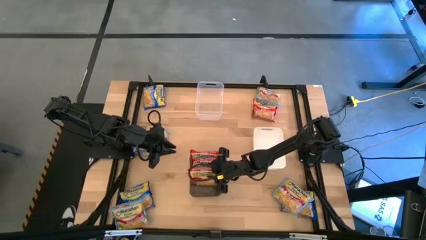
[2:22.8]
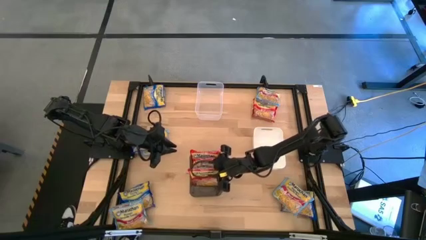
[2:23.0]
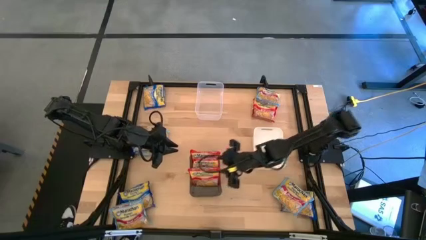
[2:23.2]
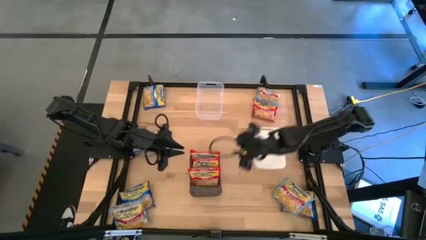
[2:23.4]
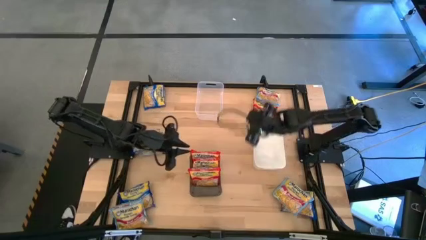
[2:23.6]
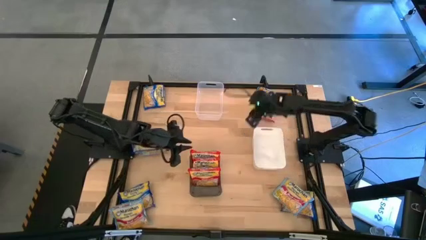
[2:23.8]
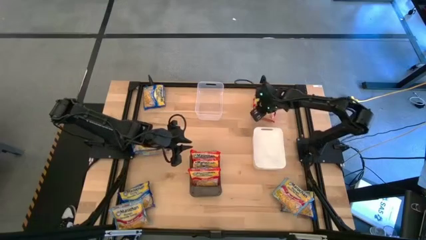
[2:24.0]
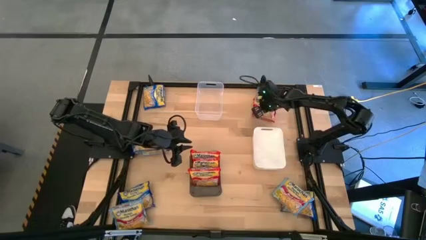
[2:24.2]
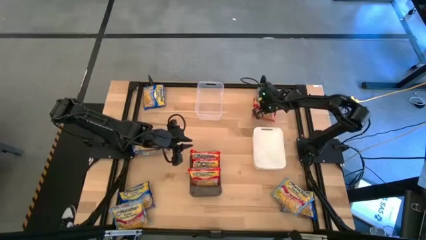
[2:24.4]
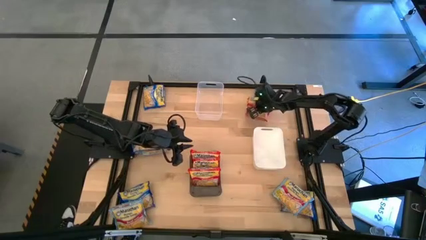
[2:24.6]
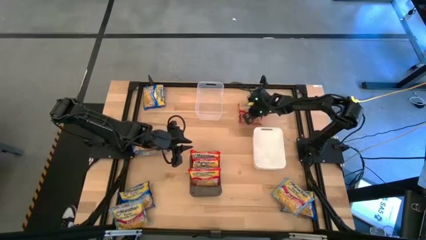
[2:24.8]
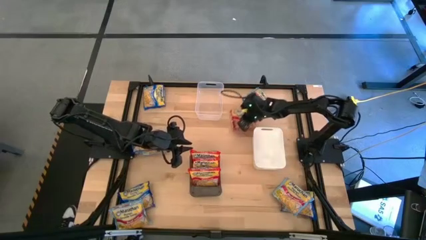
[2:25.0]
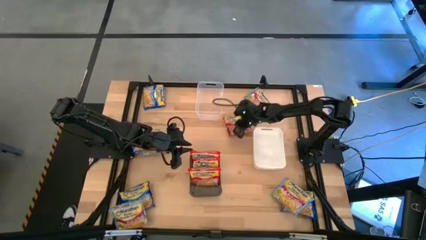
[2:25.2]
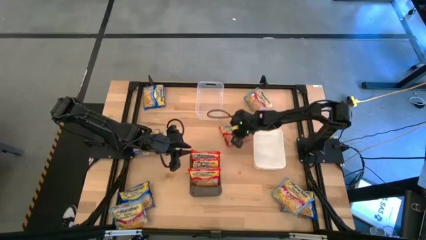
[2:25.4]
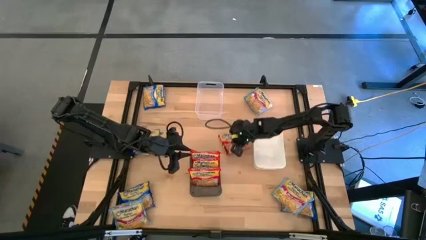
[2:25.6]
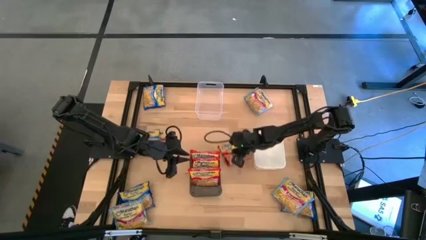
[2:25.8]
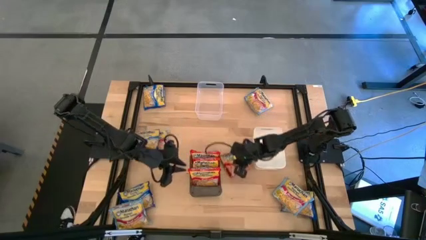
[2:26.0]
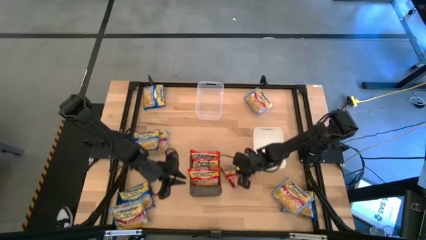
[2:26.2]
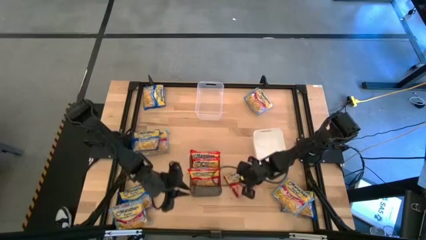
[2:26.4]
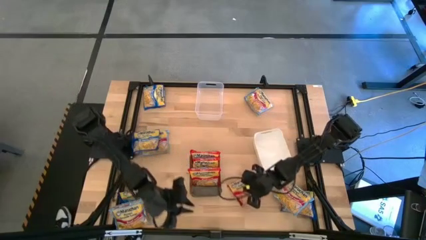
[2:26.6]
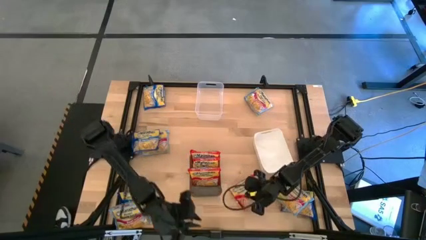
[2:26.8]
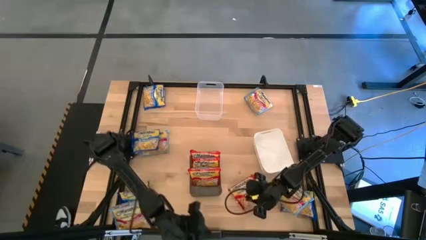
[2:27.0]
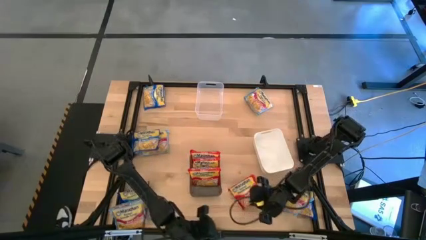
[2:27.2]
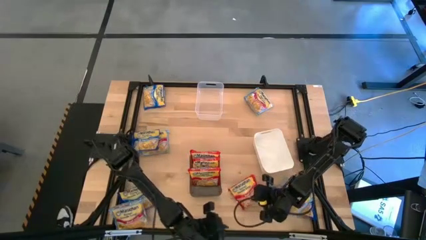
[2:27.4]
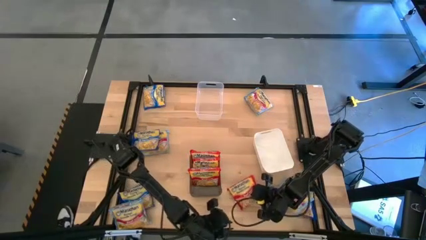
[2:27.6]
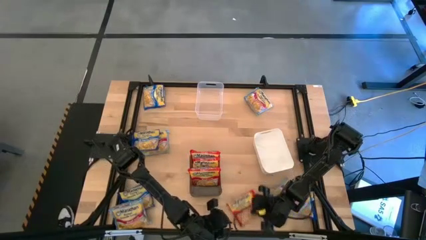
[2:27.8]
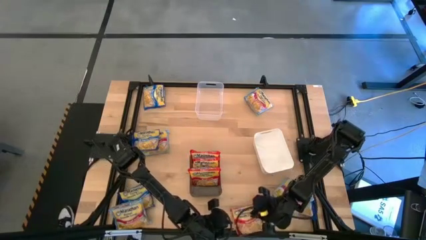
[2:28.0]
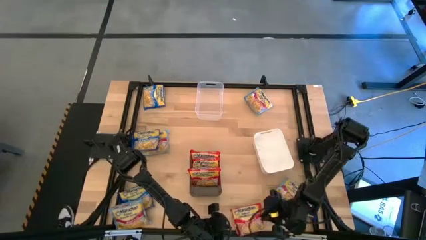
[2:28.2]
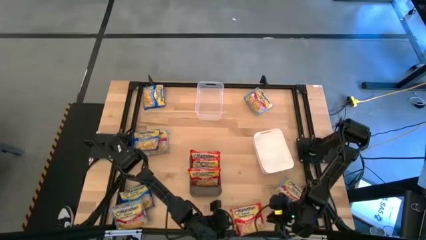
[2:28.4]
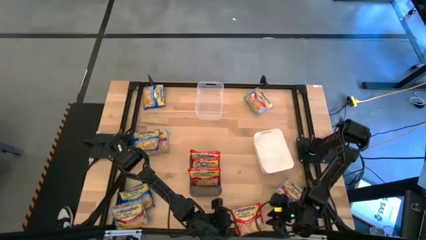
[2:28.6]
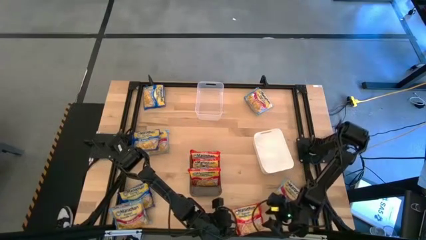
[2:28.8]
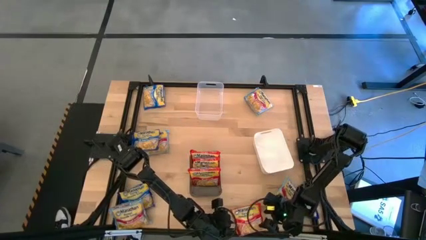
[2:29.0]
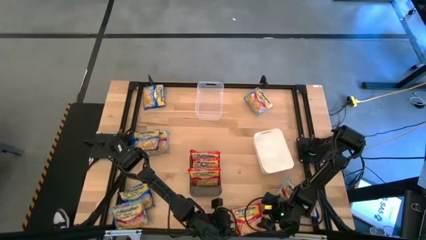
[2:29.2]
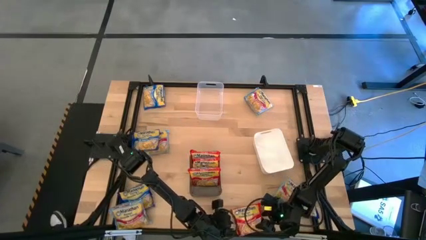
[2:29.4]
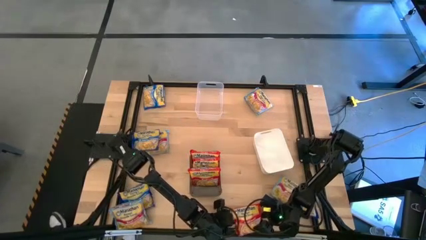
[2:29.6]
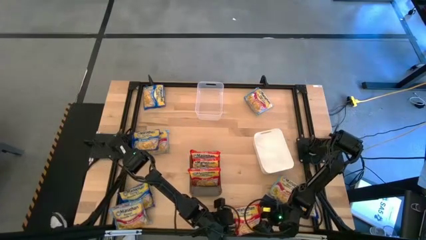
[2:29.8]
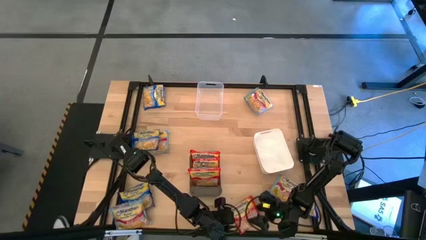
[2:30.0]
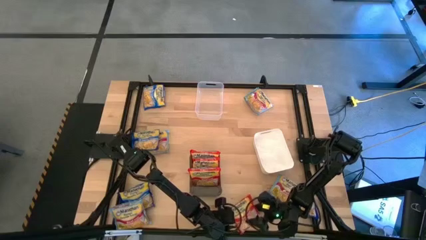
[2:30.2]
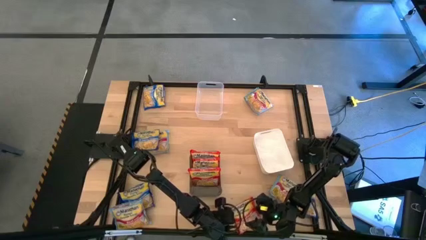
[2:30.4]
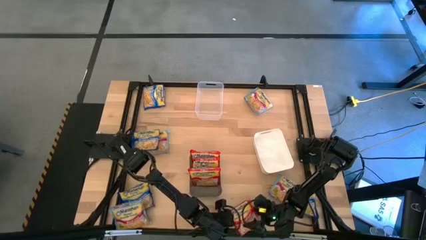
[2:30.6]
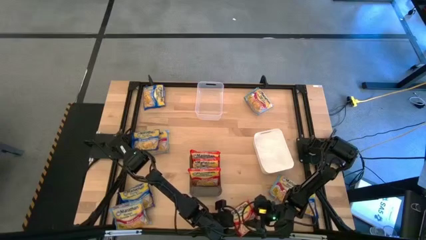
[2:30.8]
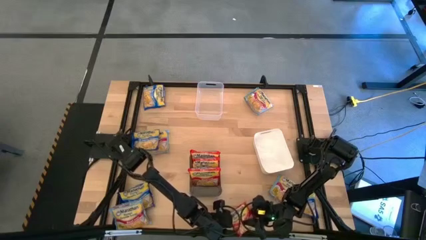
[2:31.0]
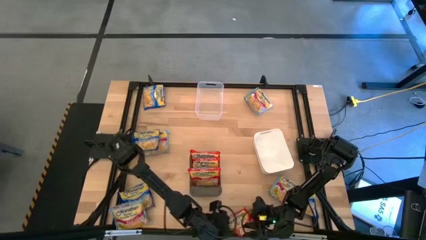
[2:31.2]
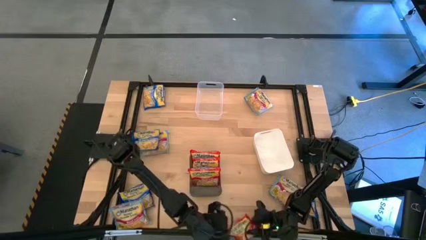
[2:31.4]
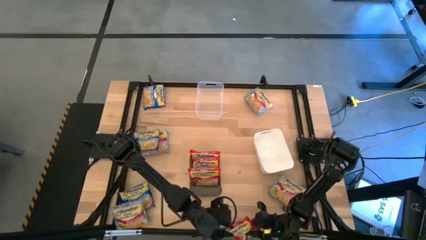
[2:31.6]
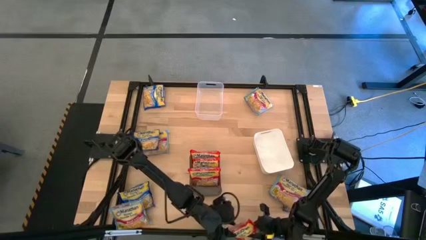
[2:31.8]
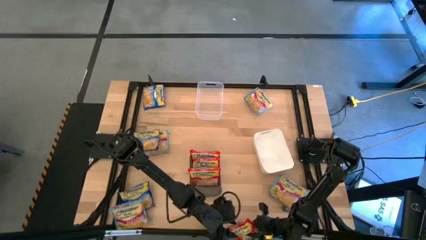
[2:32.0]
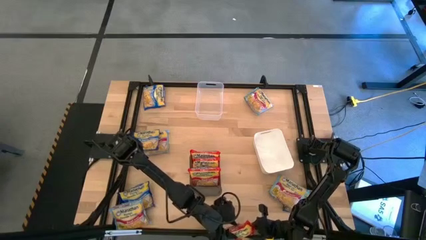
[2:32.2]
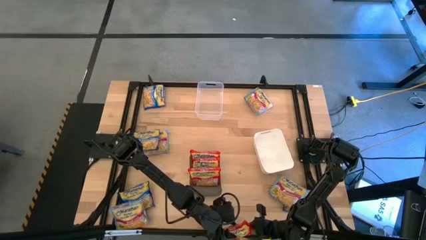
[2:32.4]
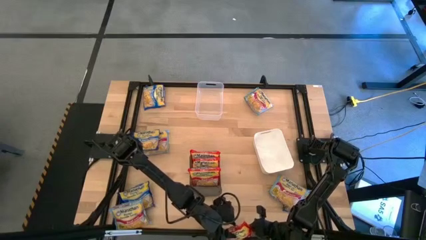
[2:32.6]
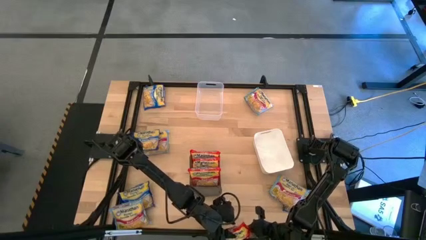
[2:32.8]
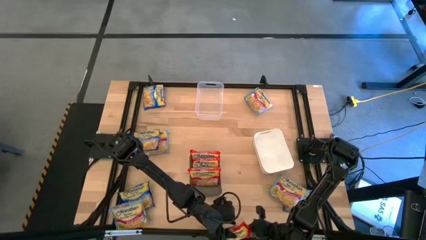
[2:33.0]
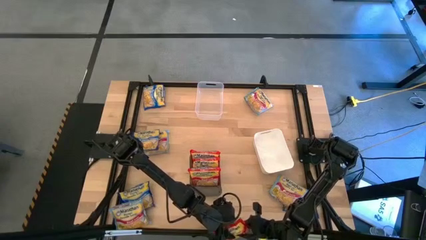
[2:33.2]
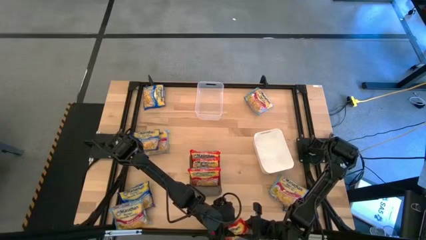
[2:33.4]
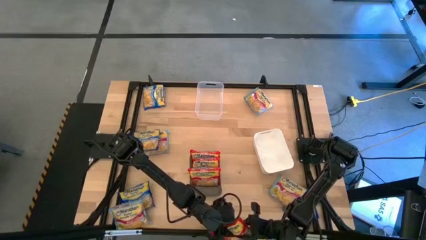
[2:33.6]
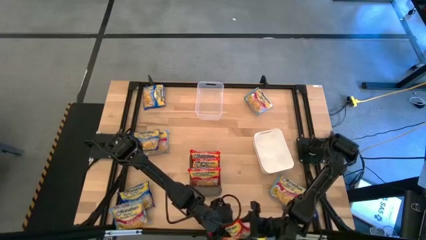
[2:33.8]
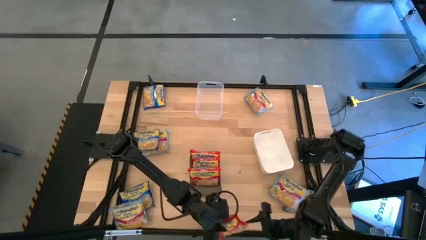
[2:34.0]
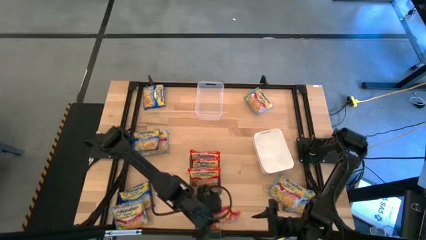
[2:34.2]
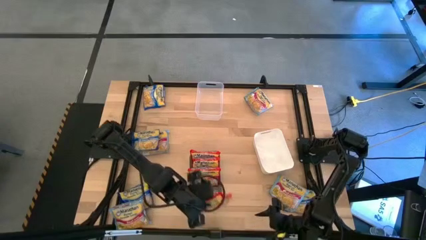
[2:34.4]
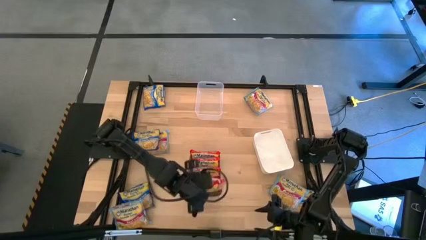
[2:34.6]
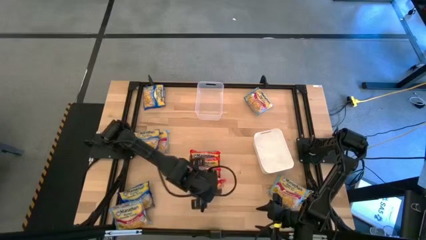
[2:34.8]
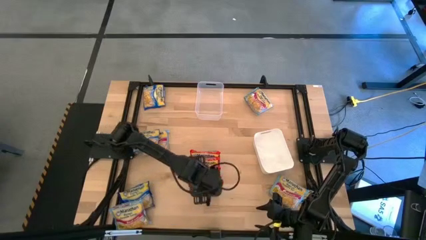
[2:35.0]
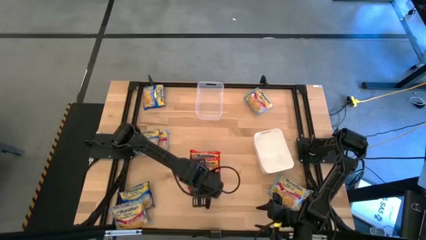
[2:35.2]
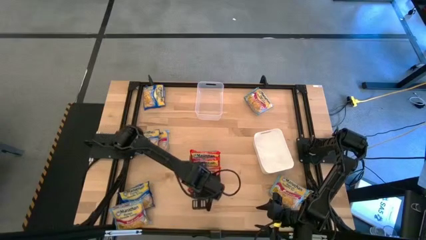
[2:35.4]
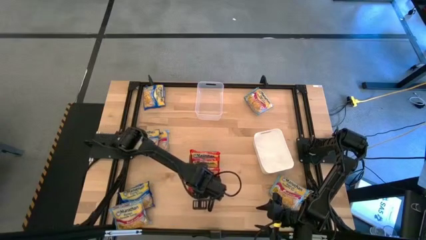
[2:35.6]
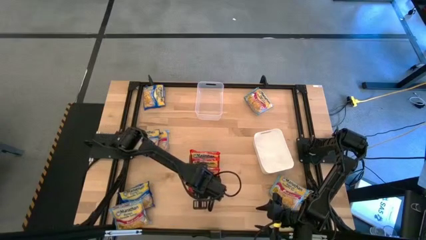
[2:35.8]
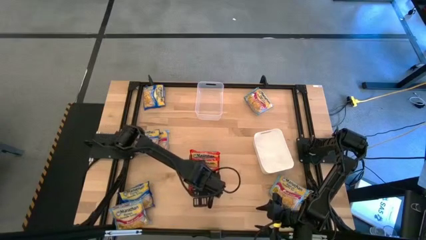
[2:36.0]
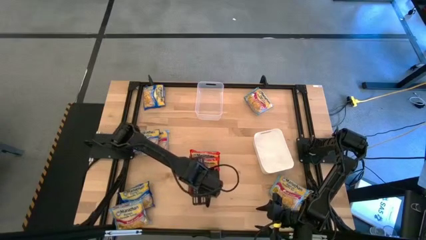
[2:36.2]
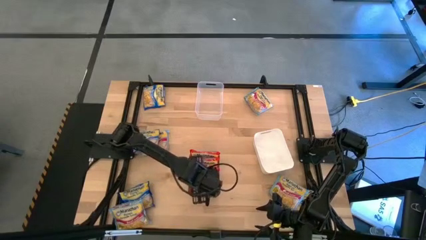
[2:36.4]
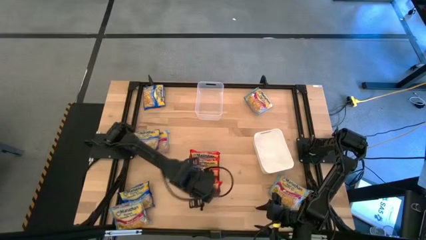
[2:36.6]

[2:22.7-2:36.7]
Task: Sort Maruchan noodles
Put the red noodle pack into the gray bin

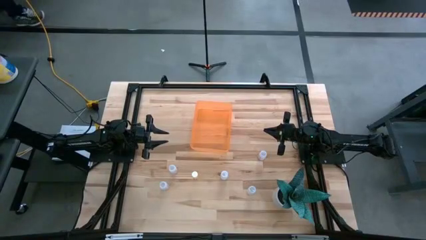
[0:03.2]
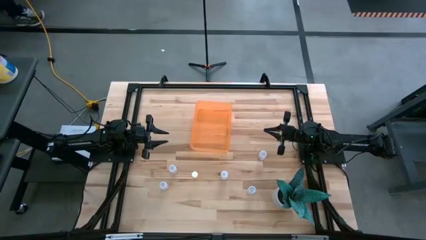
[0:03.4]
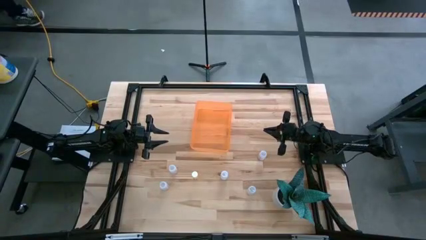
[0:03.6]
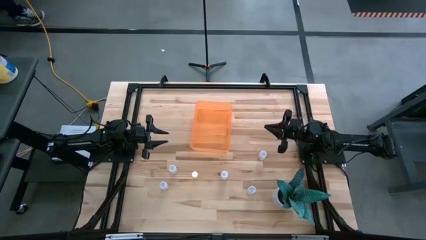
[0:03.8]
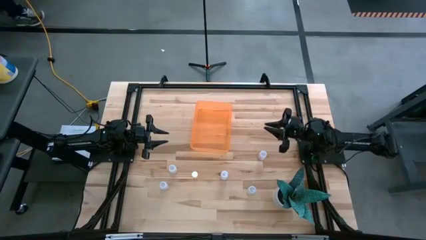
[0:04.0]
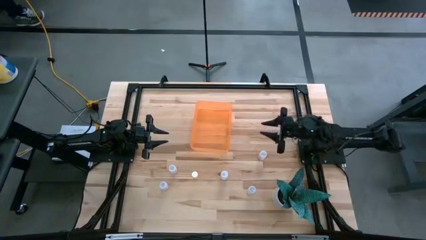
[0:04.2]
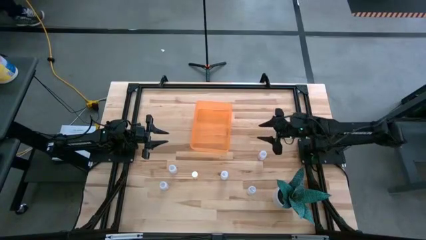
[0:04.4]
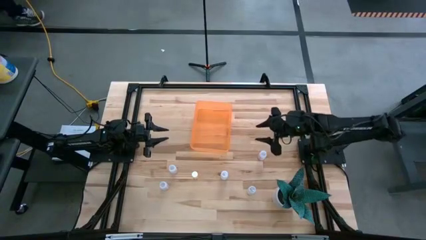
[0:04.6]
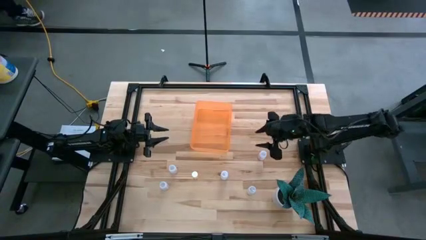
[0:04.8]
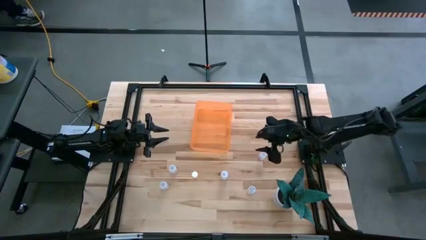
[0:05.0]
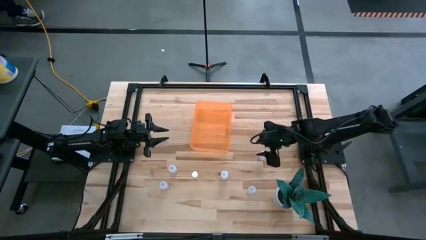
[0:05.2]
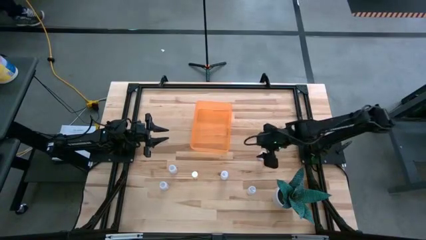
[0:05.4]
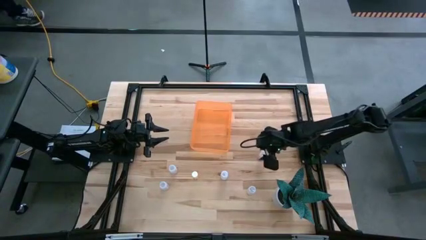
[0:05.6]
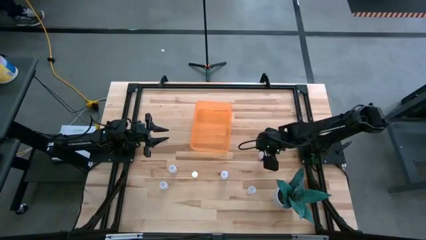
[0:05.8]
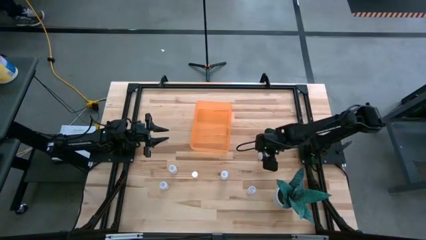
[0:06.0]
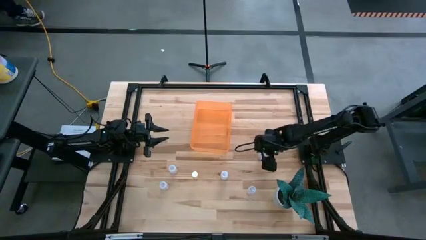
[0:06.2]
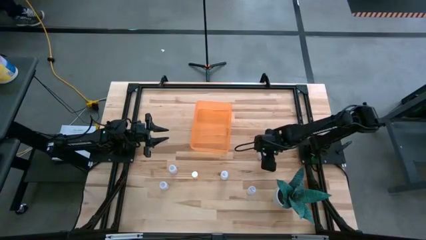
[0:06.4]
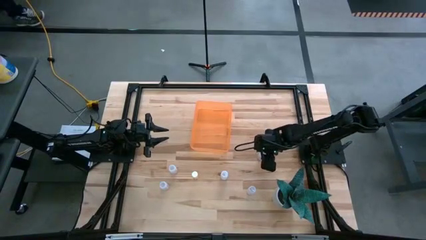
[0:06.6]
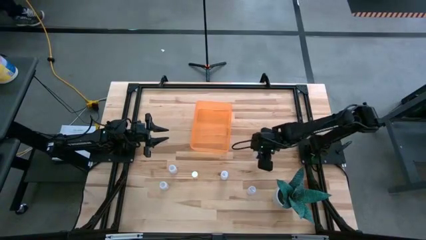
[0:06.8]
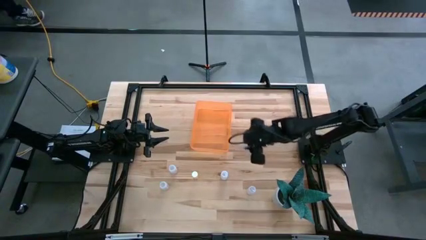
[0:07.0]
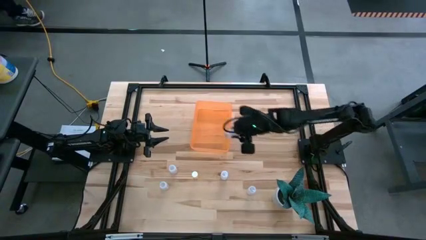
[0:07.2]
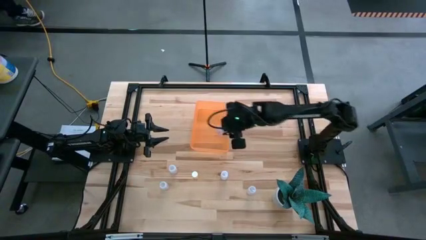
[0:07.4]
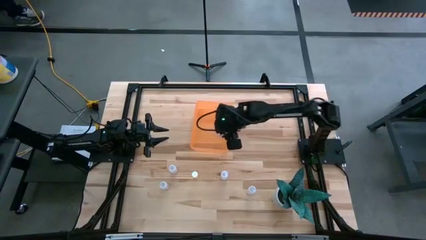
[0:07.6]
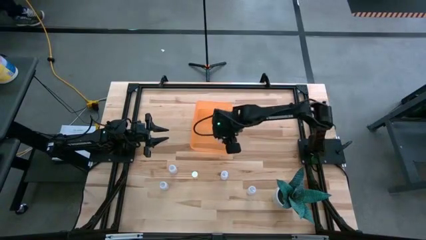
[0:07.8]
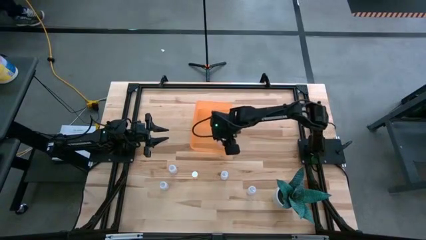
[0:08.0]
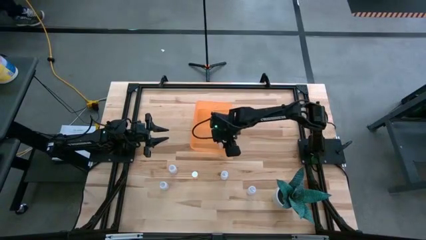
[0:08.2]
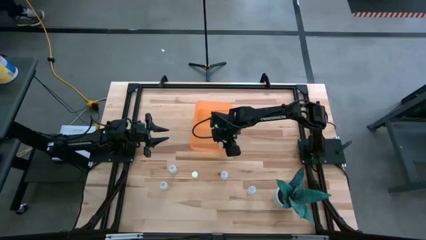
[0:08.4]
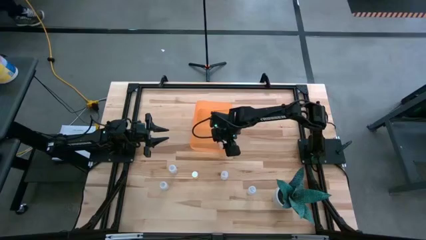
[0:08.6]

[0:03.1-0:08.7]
Task: Pick and place pill bottles into a basket
Put the transparent medicine bottle into the yellow bin
